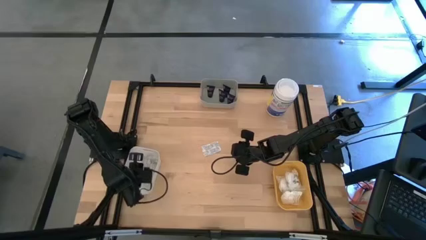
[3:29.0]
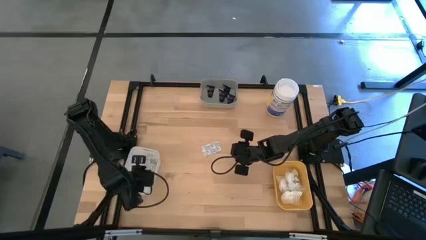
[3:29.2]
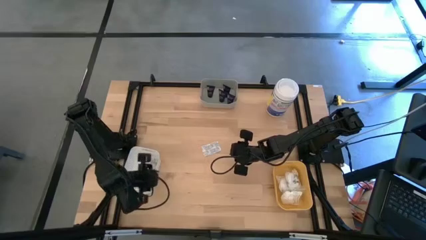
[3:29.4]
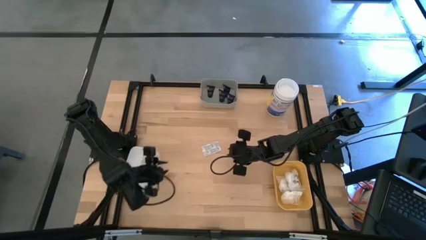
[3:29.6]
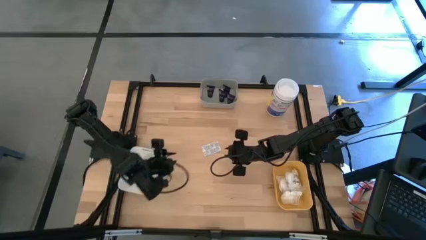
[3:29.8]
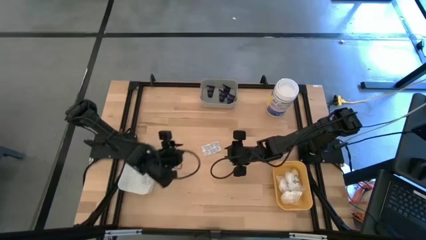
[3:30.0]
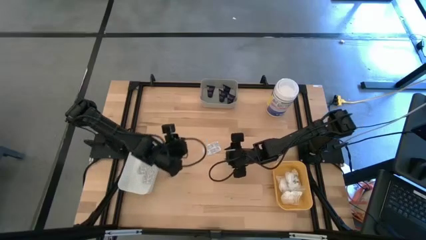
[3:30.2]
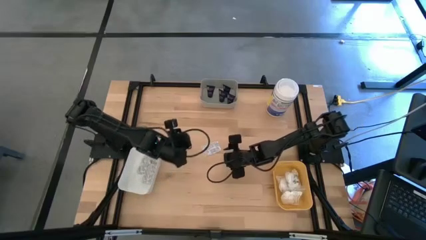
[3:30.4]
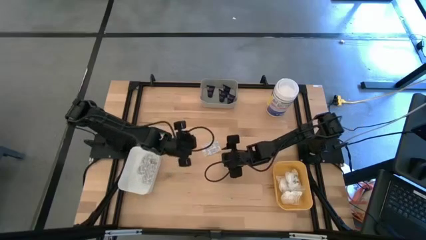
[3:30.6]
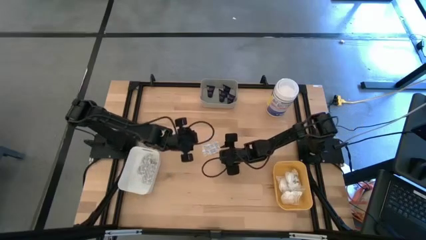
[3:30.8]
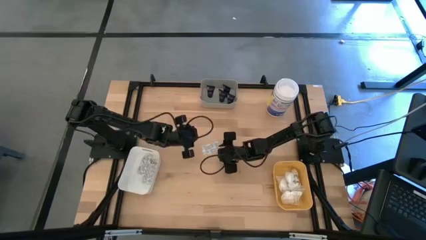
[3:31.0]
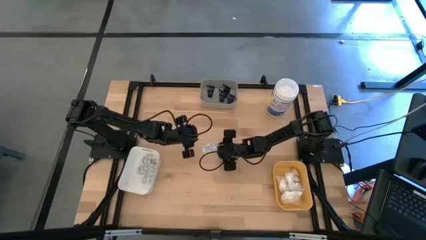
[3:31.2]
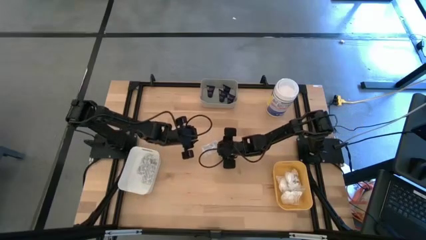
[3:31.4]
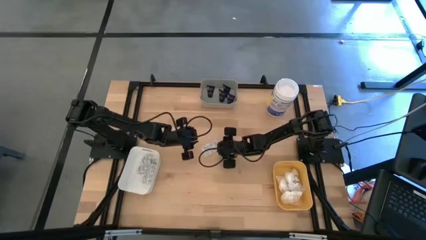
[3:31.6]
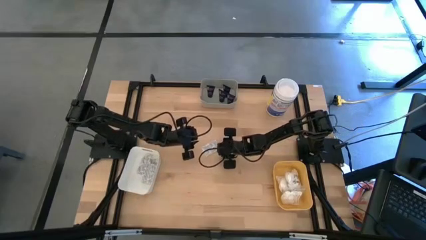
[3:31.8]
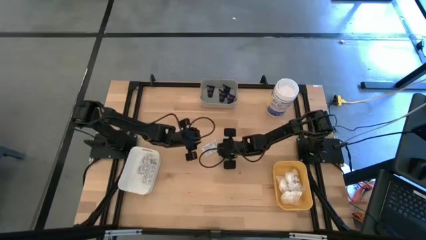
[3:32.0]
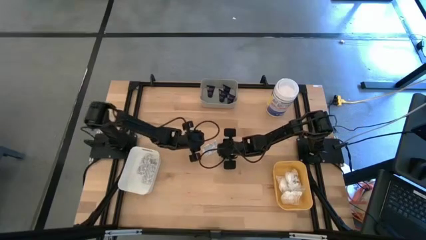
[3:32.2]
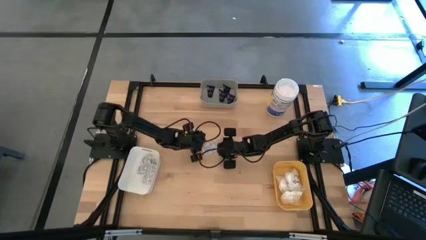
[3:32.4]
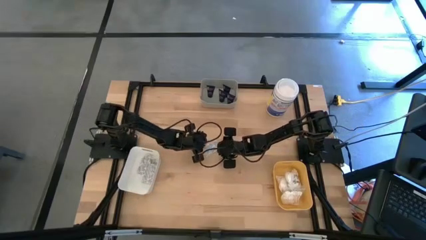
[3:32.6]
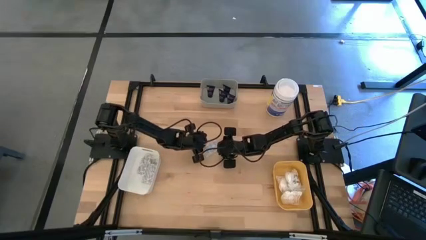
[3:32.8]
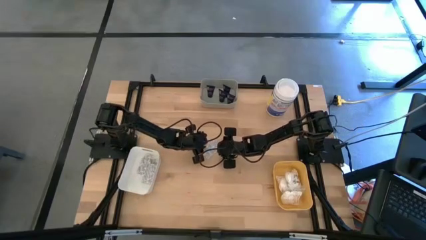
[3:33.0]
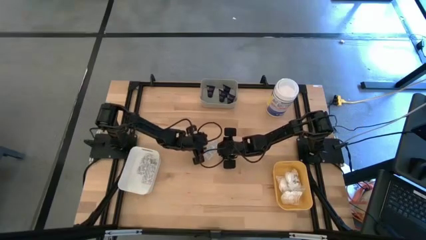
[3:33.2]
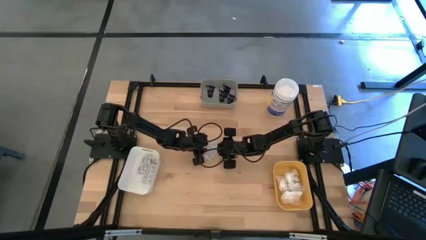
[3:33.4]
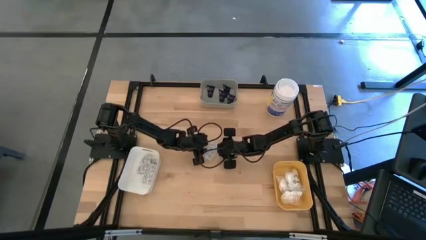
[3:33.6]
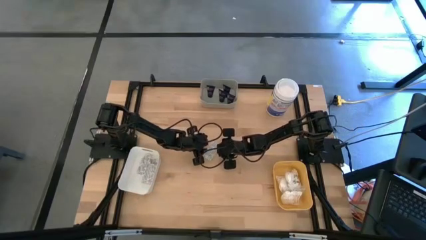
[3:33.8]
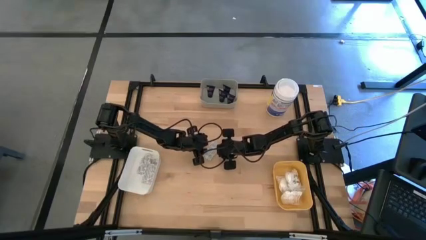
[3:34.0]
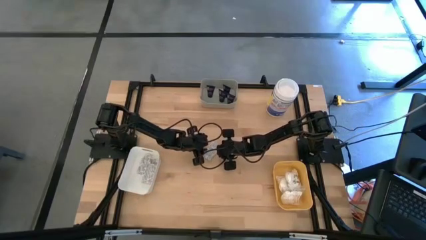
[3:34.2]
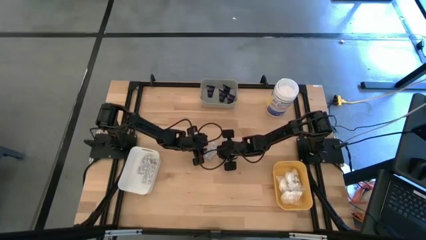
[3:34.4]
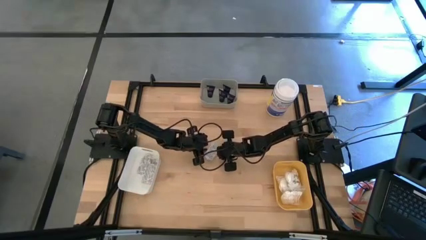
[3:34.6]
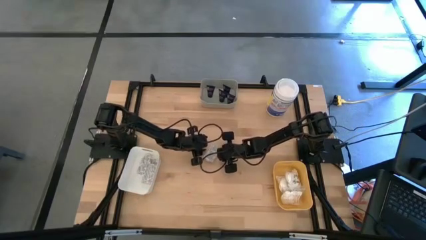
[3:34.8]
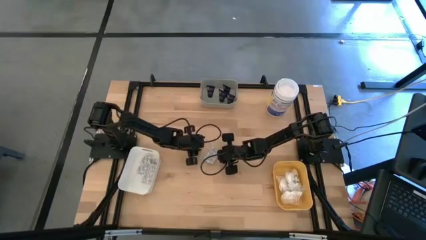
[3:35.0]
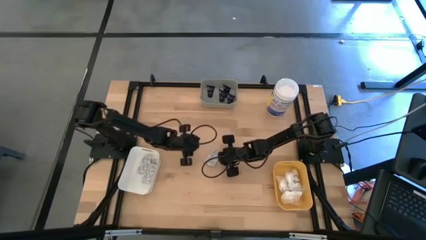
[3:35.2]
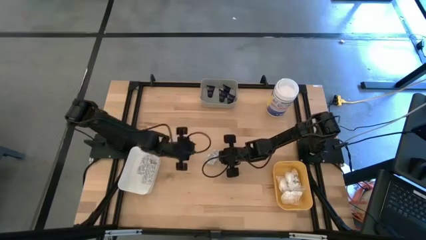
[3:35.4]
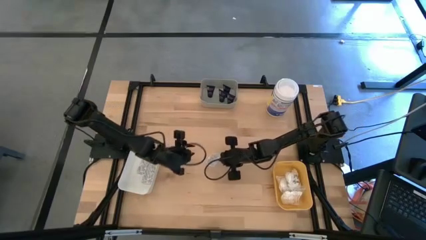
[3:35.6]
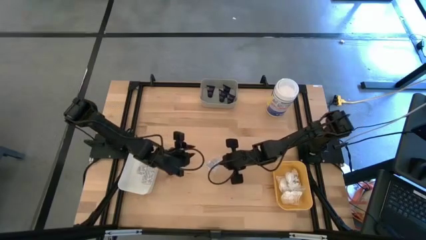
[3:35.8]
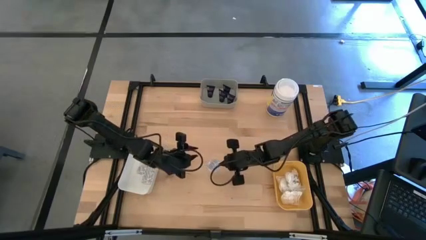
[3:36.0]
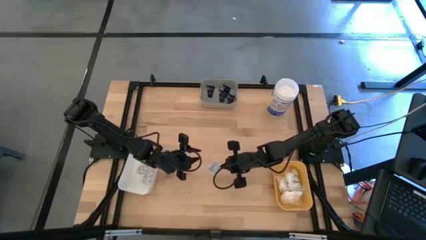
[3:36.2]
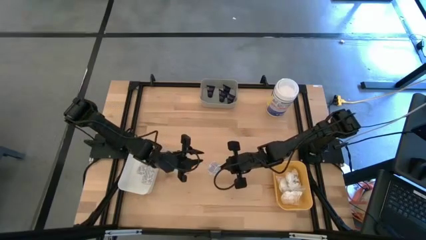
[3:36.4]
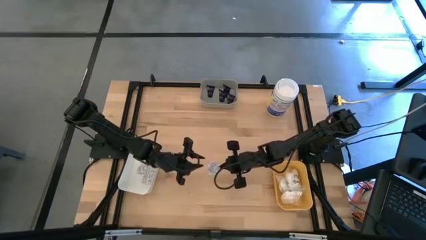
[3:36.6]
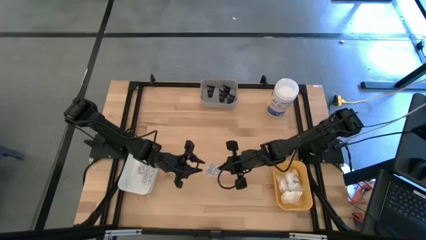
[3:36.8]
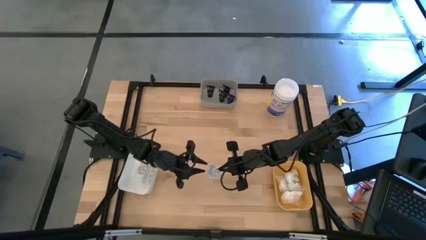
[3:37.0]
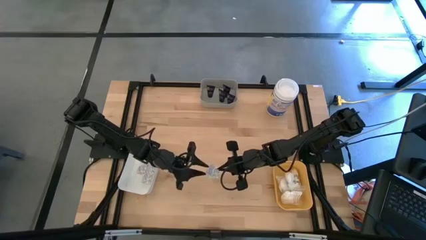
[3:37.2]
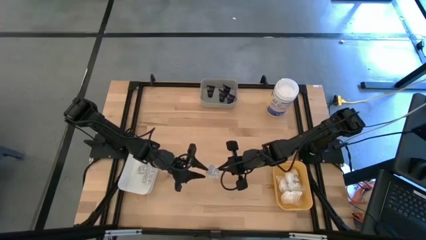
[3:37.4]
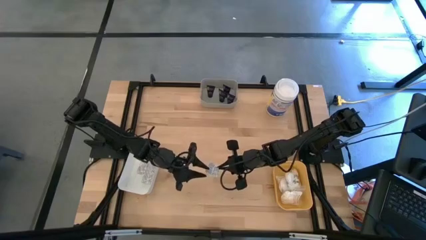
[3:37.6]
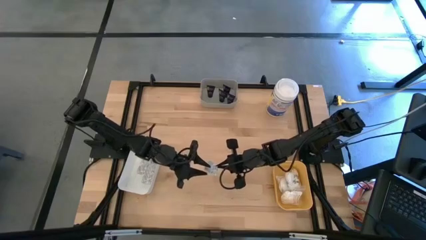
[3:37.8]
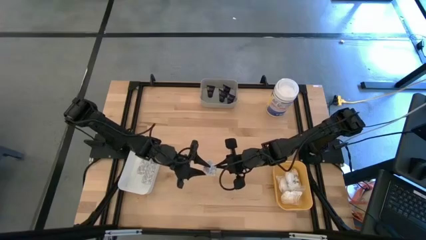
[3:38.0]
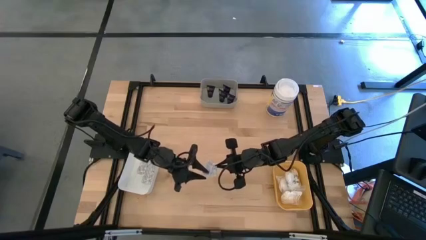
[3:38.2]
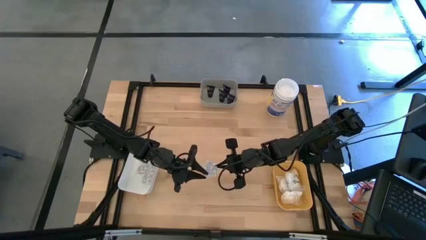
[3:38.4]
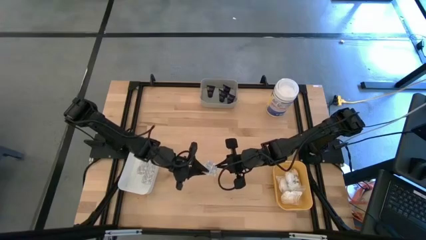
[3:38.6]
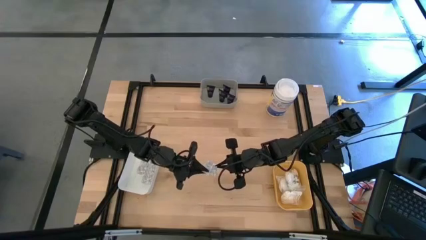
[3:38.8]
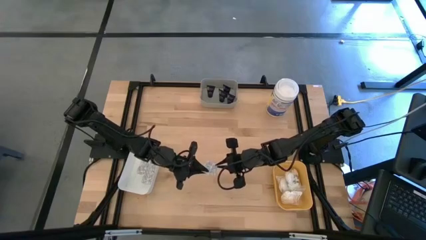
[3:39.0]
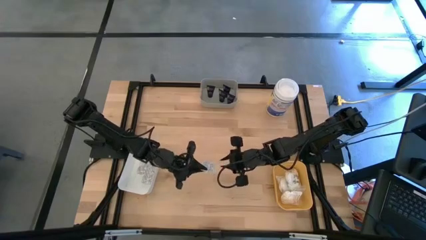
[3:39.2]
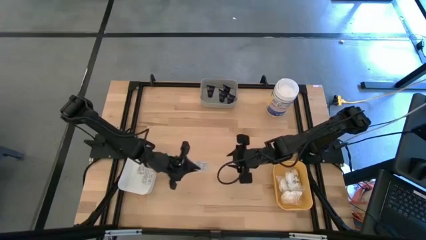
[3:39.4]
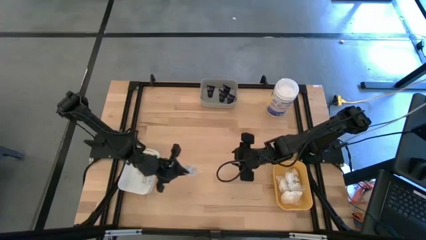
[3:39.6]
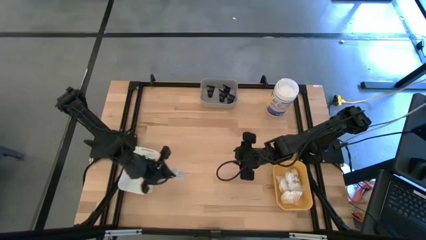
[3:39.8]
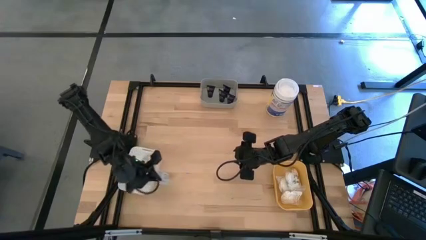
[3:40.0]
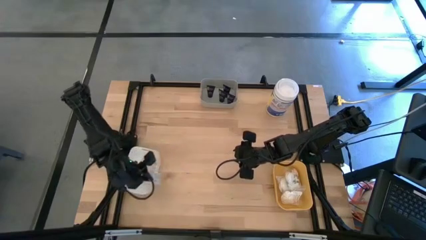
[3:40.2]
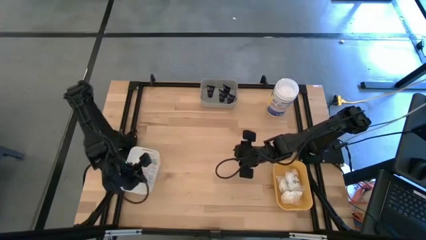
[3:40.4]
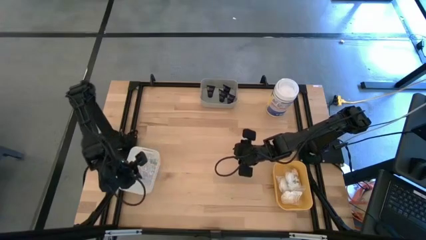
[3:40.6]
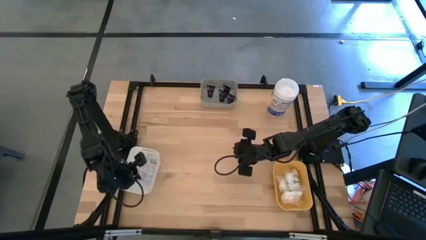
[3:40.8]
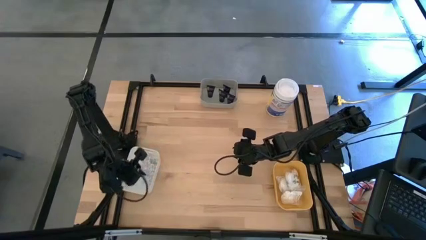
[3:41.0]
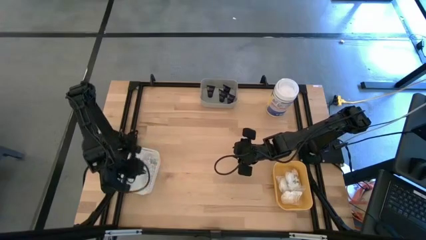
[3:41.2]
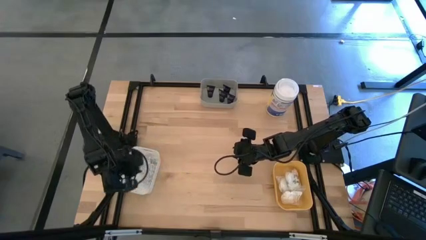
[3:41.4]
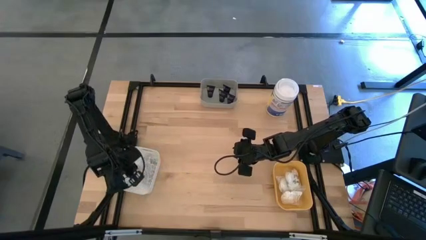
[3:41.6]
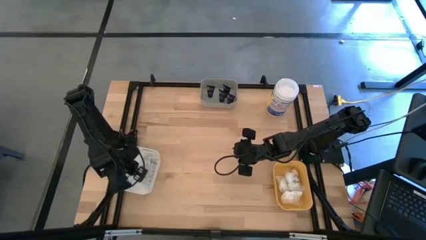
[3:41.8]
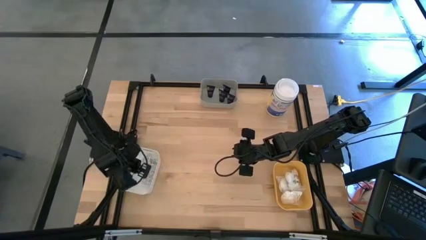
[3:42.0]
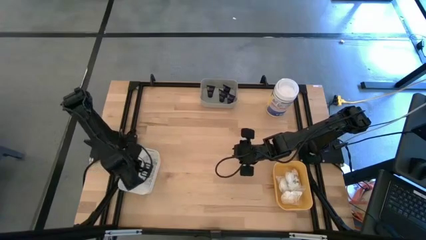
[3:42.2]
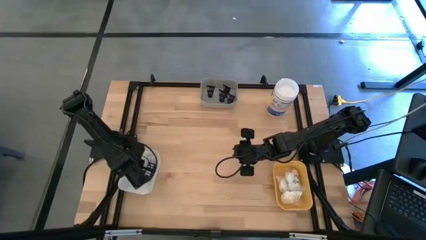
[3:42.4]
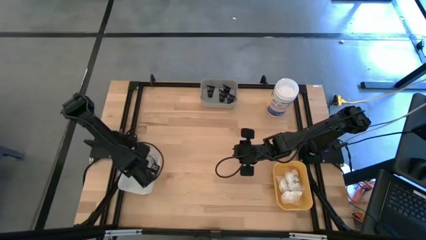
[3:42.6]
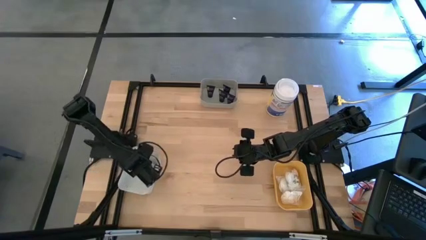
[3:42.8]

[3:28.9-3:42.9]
Task: Pick & Place Travel size toiletries
Put the bandage into the white bin

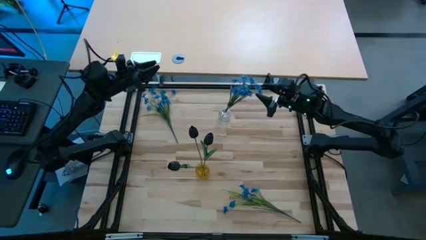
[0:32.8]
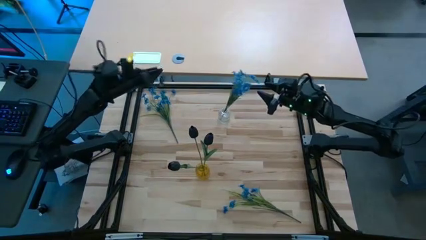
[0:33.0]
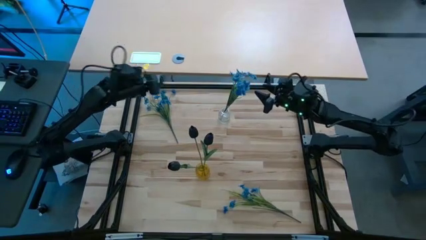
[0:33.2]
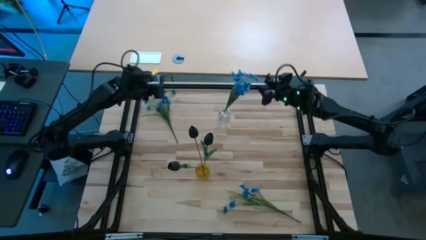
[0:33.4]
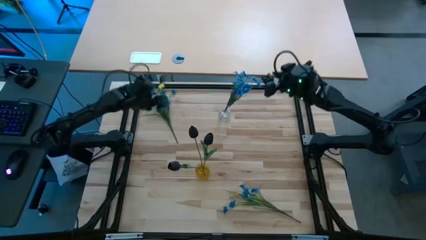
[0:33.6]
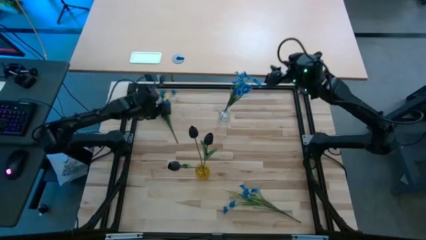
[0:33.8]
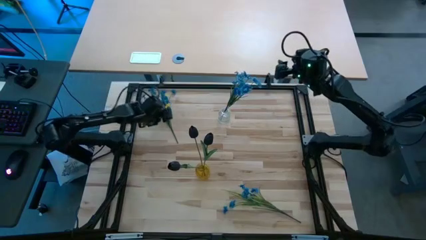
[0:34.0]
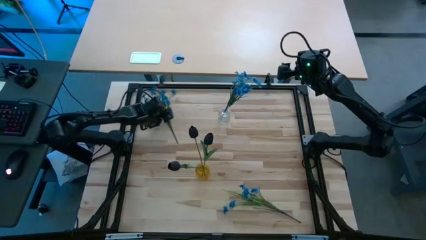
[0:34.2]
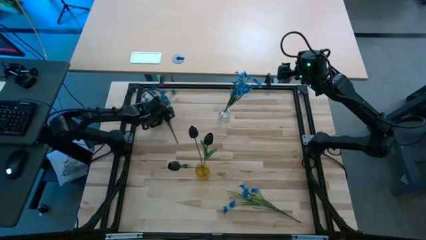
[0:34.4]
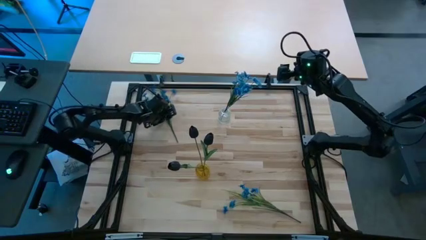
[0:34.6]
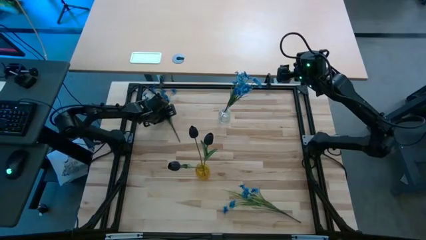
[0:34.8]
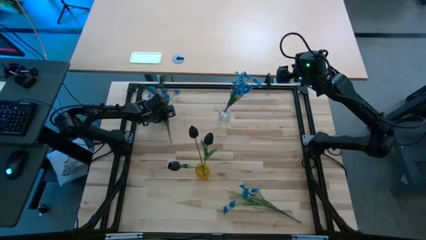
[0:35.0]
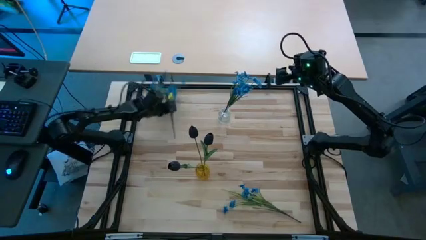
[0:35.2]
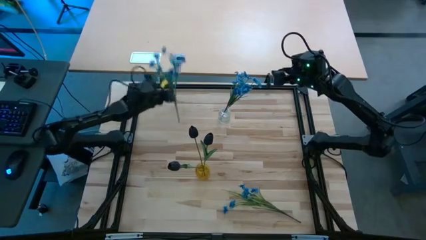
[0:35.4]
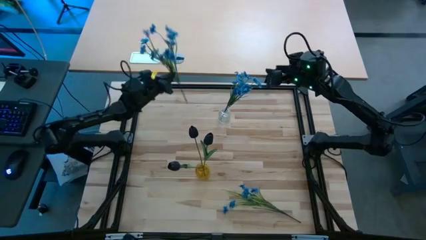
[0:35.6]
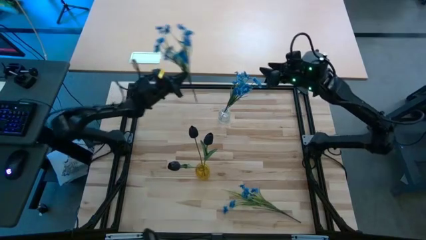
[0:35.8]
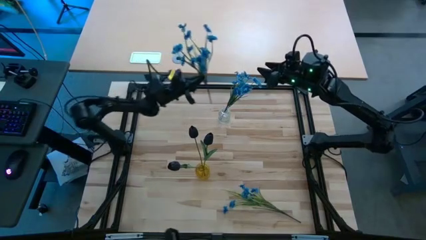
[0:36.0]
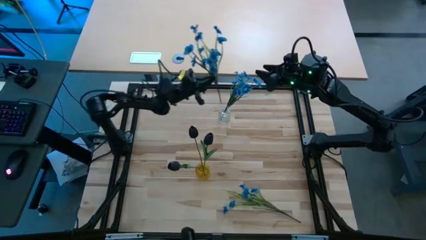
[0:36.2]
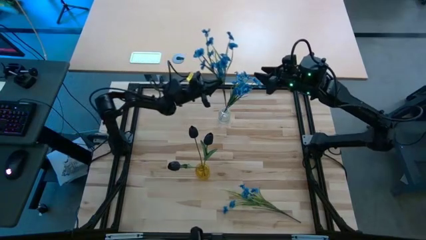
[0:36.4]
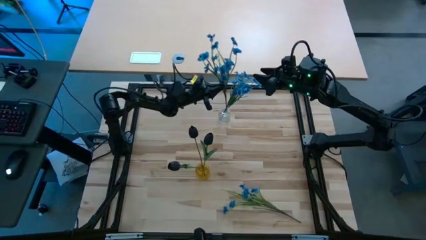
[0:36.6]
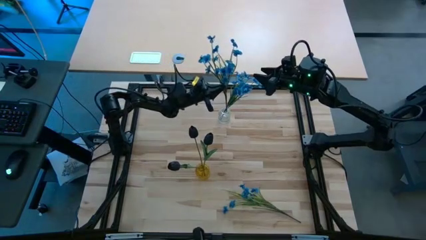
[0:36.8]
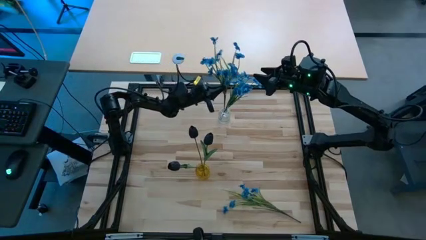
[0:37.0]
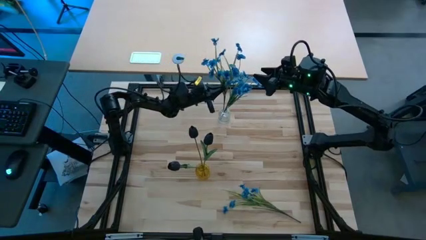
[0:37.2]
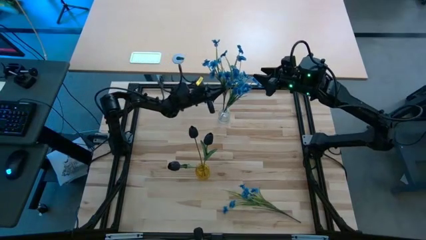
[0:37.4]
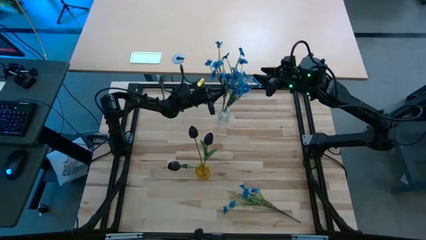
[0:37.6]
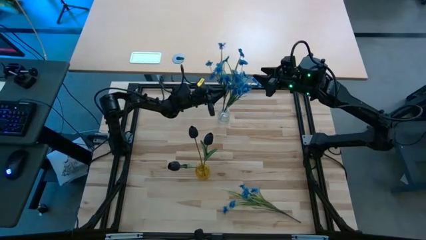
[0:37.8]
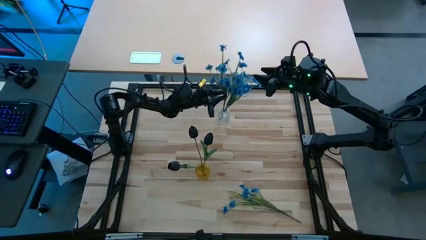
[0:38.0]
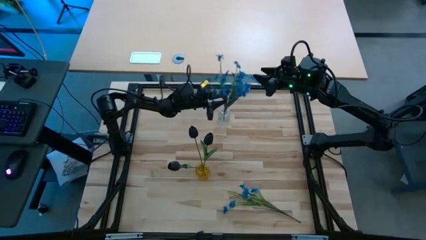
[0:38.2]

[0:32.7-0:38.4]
Task: Sort flowers into vase by color
Put the top blue flowers into the transparent vase
